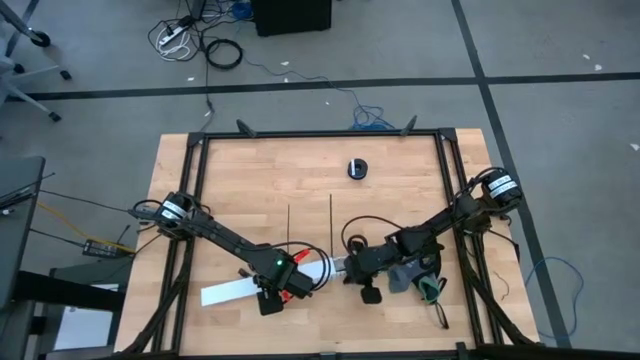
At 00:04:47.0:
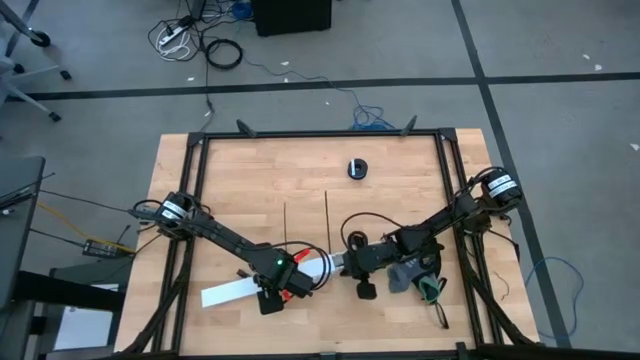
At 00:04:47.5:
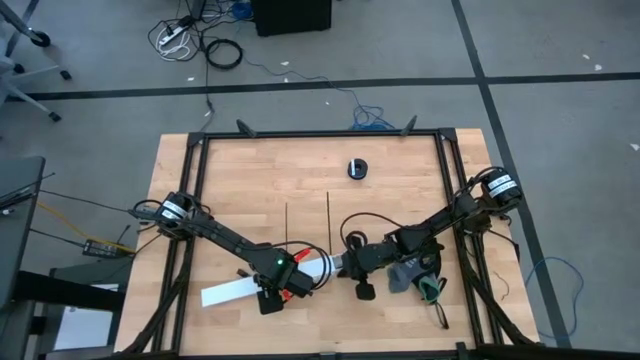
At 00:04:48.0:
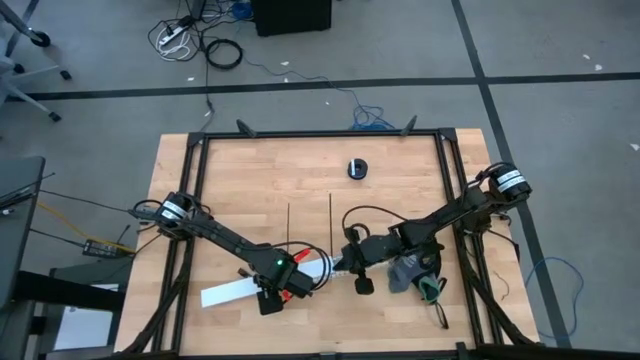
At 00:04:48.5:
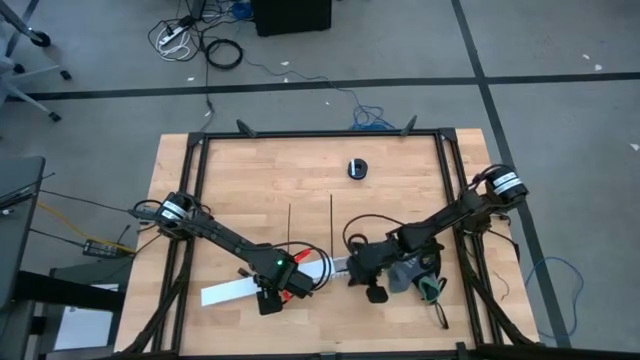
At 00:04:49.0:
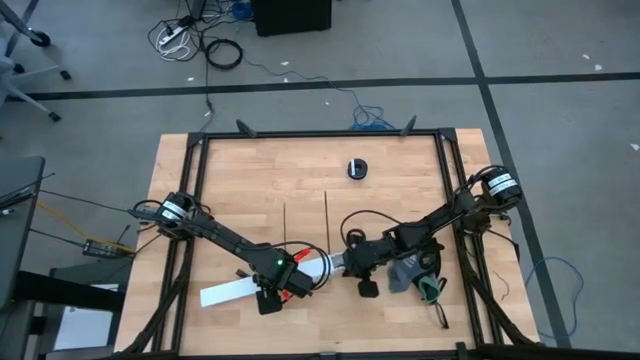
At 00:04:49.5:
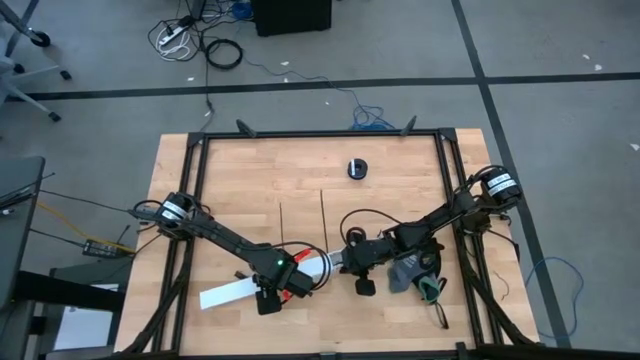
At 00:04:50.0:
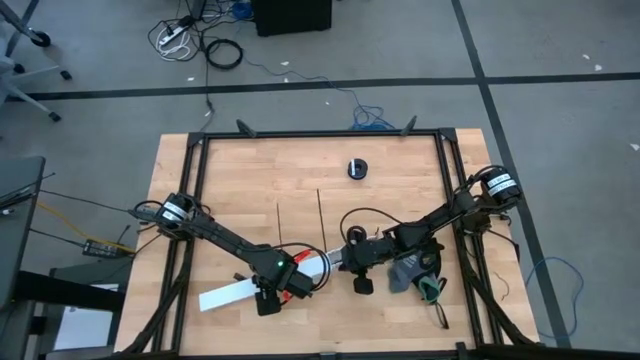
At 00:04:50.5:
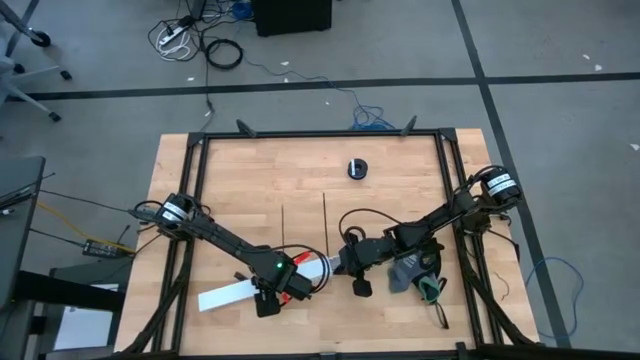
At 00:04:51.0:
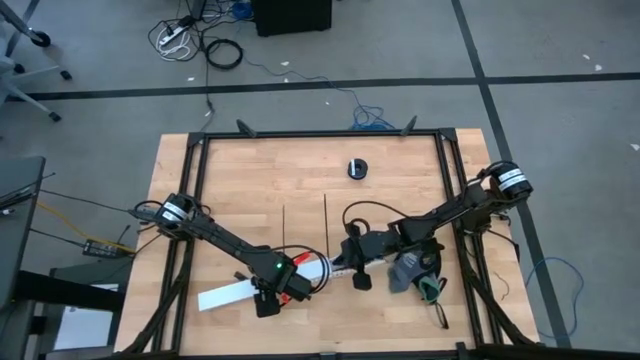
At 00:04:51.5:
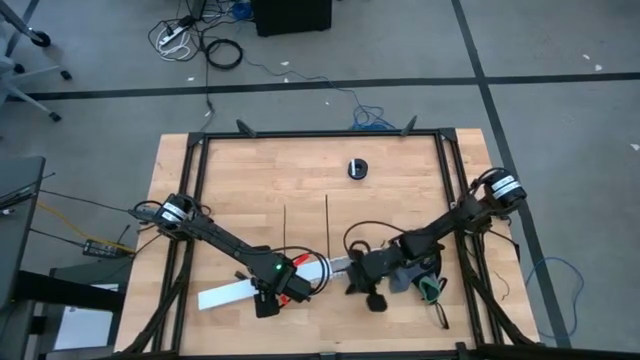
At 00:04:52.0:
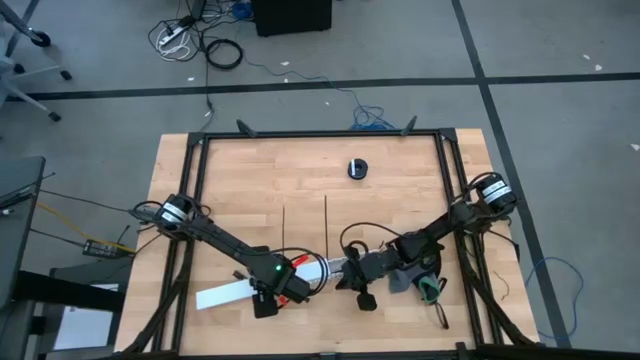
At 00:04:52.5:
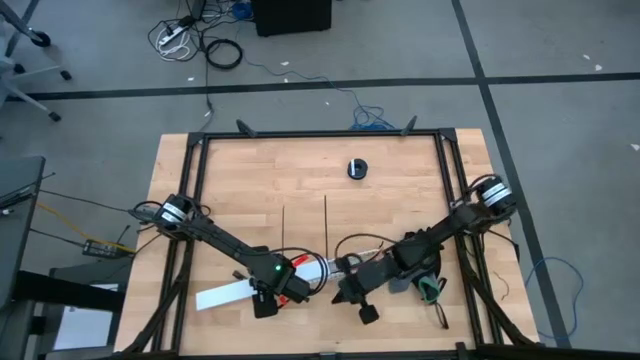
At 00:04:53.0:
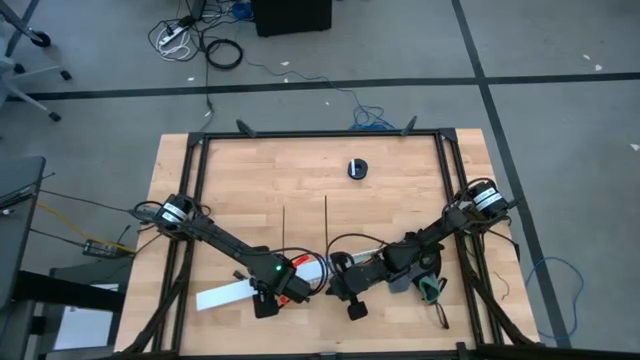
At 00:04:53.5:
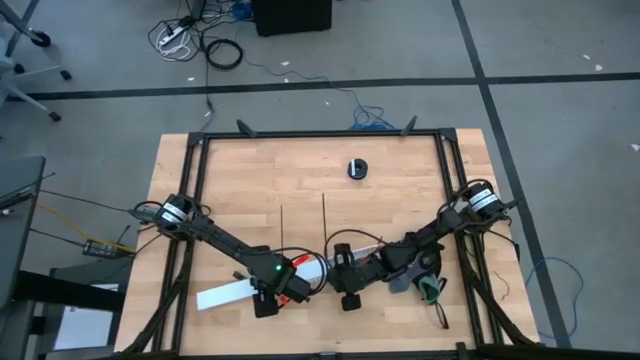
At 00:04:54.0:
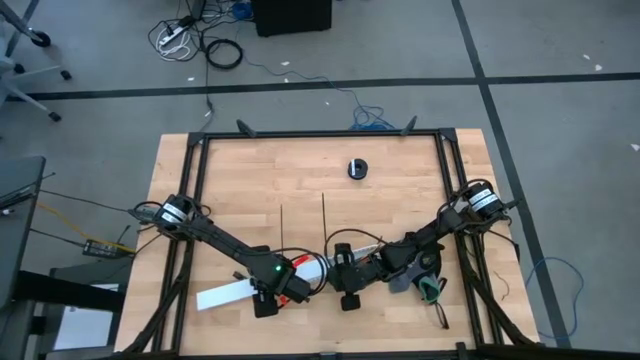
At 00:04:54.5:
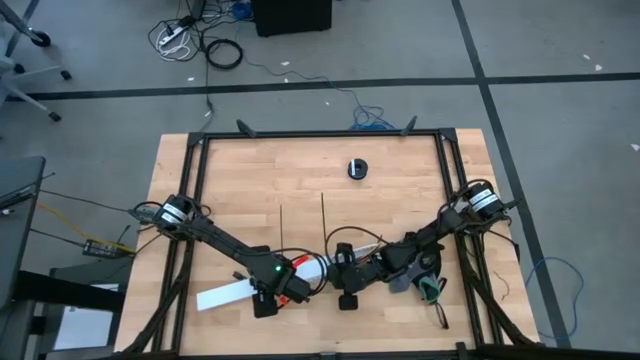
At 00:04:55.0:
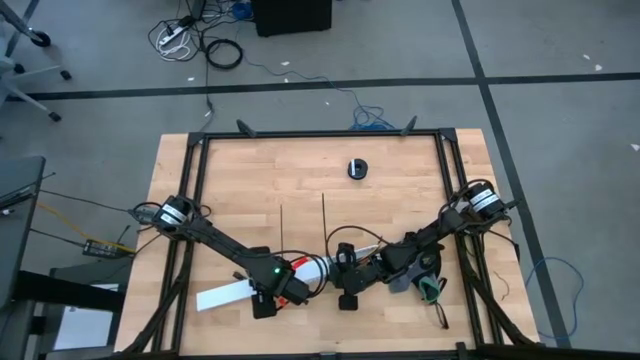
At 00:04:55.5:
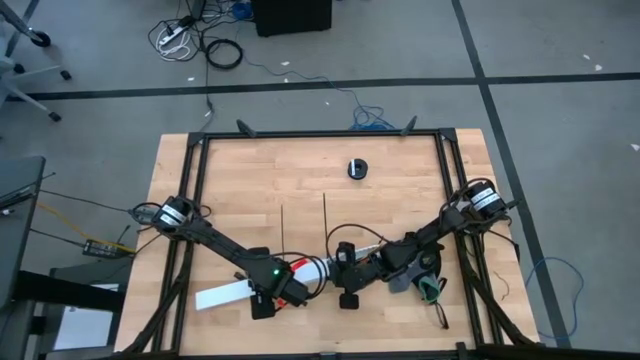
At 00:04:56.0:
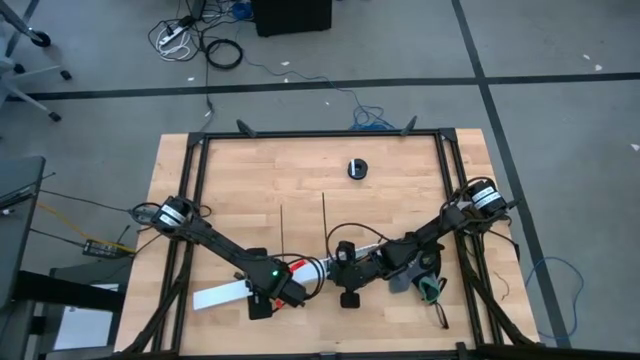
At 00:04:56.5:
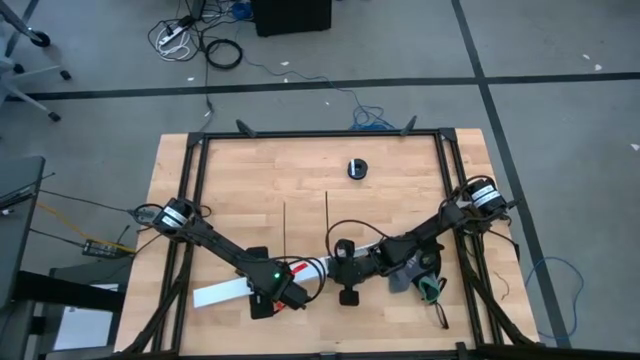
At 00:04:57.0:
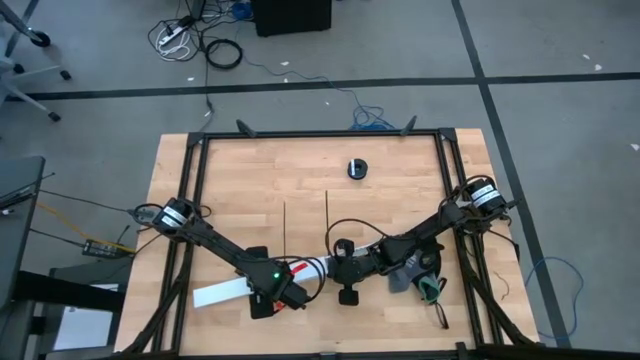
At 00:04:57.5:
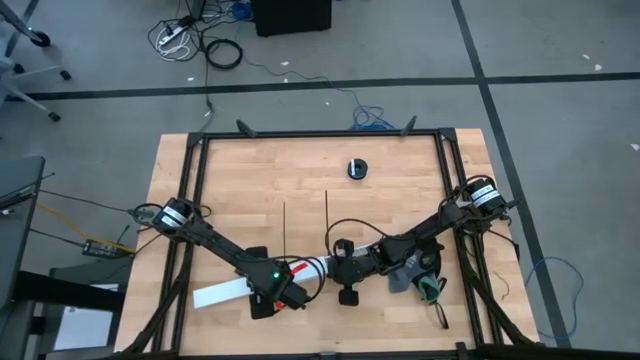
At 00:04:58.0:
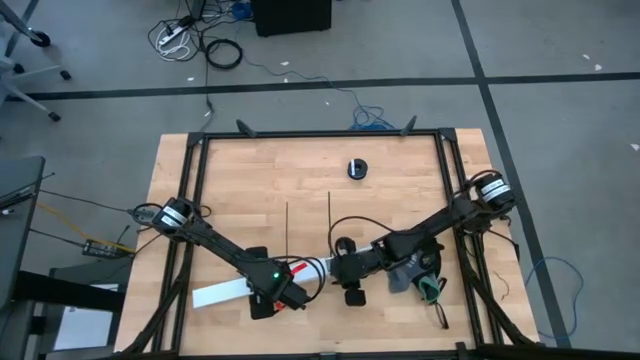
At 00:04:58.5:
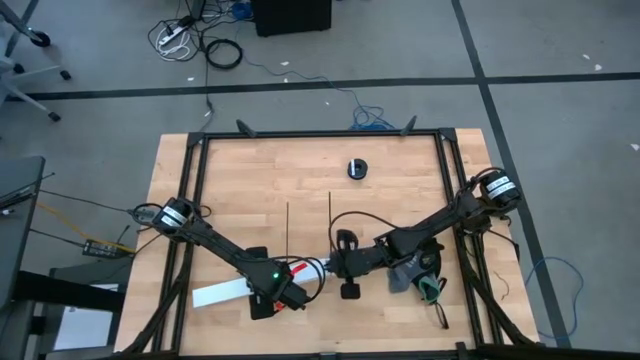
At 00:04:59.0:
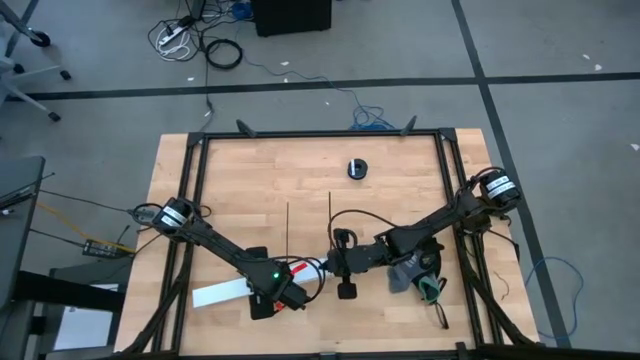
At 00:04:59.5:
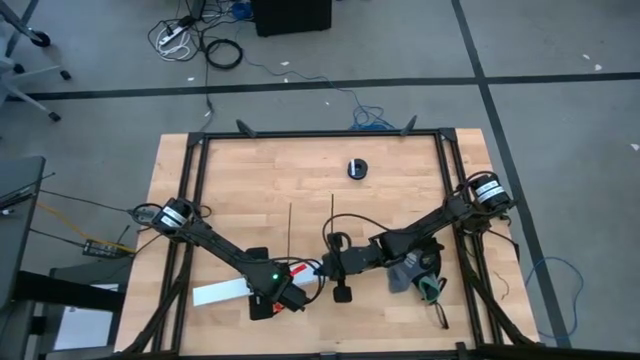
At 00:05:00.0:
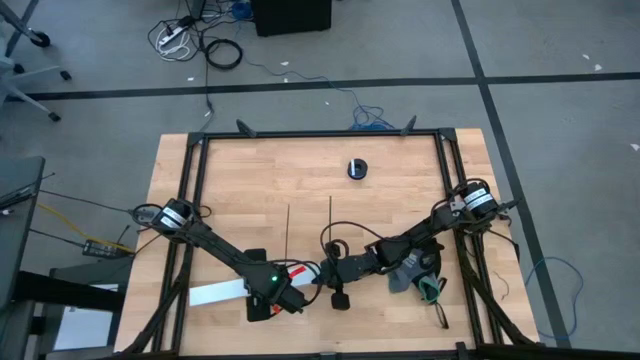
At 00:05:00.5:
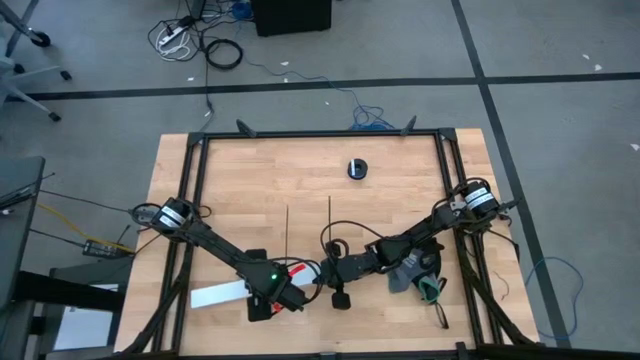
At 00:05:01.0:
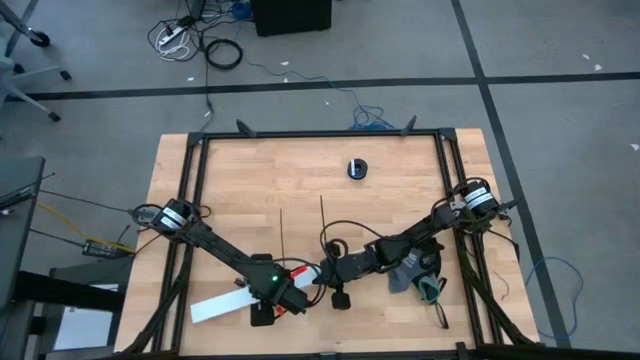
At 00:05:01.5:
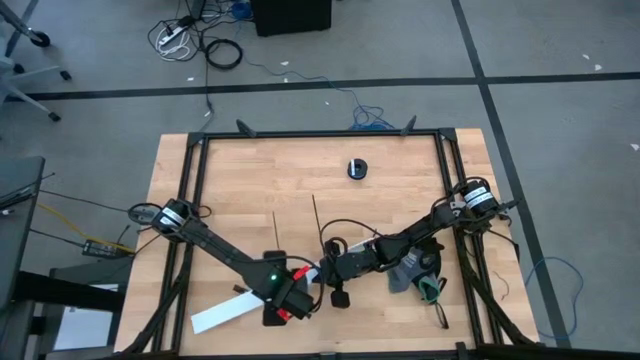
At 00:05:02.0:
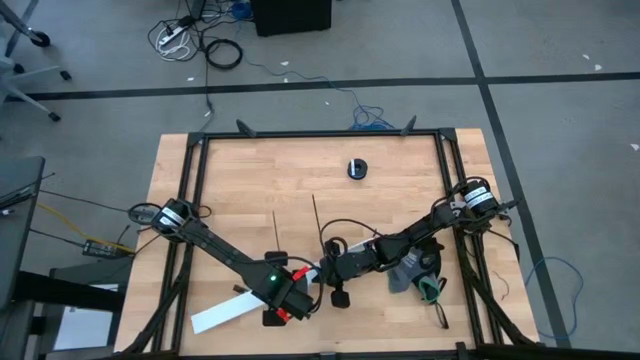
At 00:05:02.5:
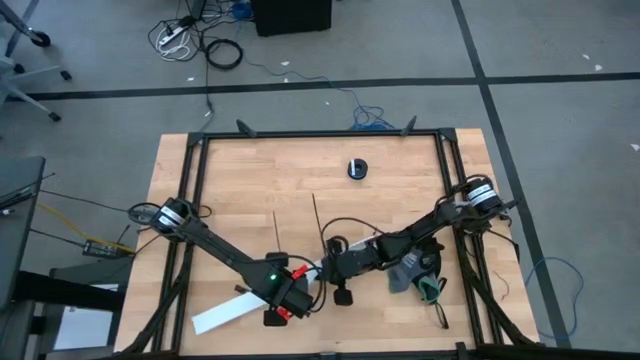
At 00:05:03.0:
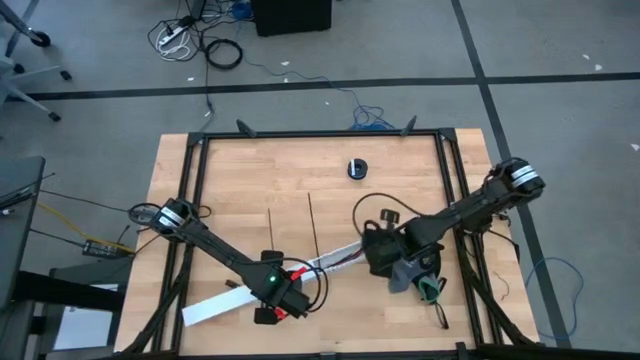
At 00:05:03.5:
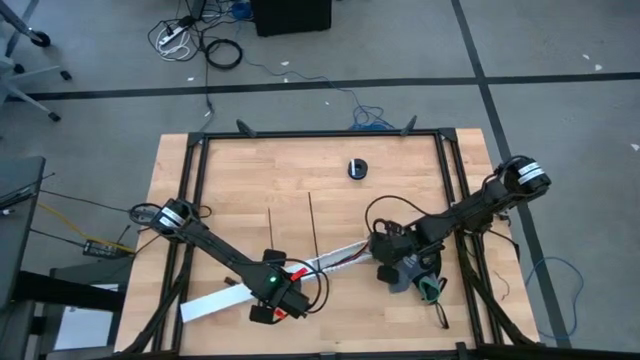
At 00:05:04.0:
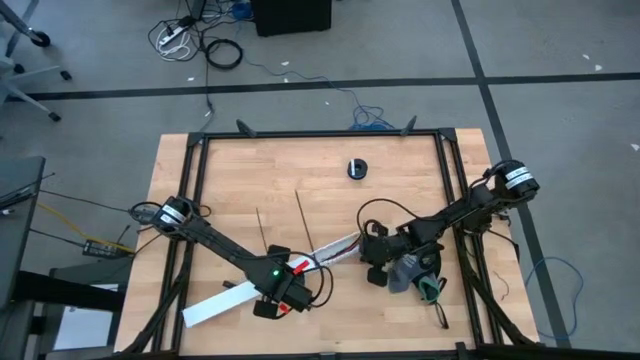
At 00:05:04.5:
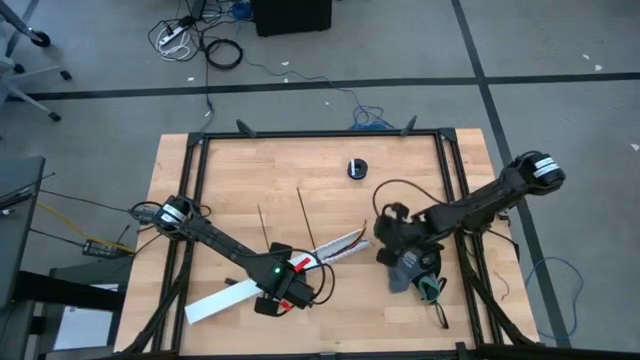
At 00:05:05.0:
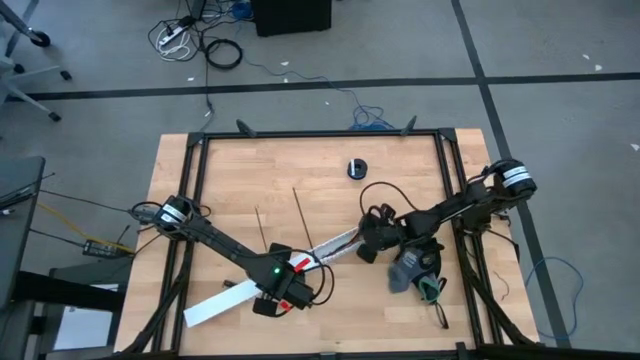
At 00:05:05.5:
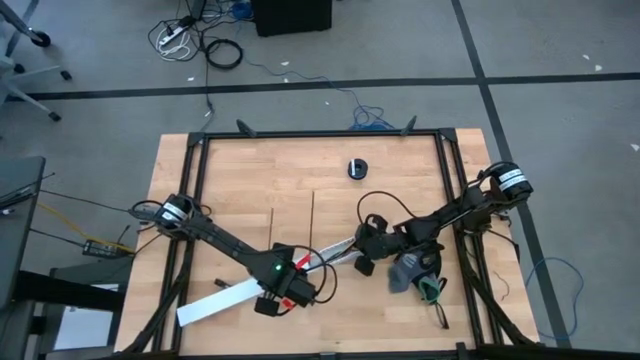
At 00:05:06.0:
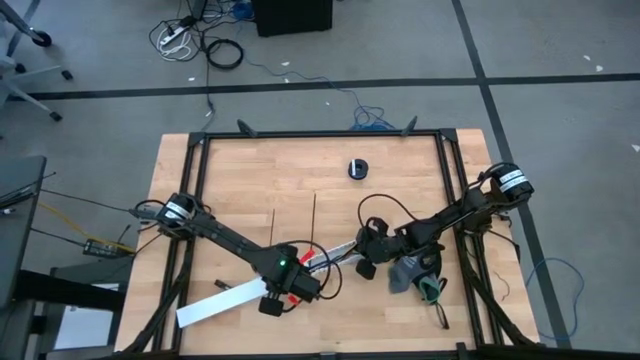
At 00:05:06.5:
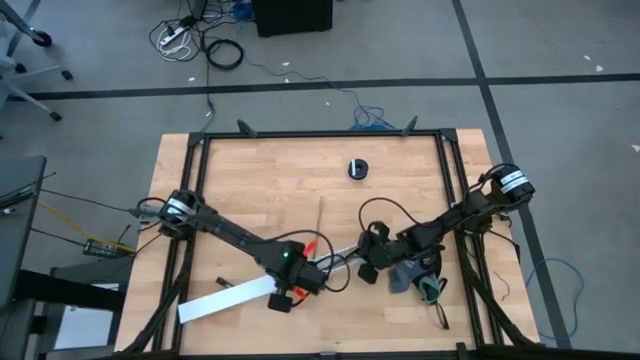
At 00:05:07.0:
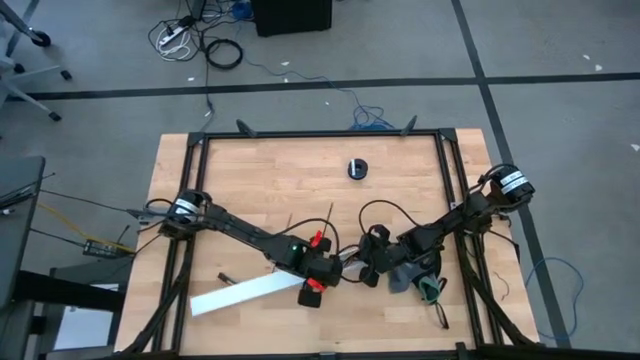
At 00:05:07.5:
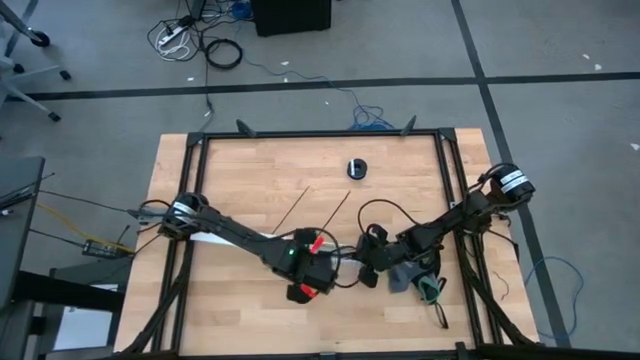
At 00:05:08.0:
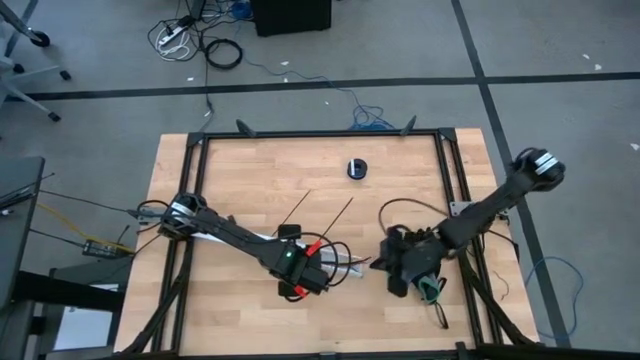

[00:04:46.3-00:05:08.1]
Task: Ziptie cables
Close the white cable duct
